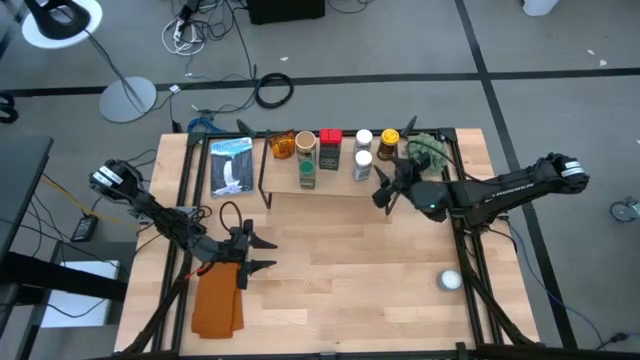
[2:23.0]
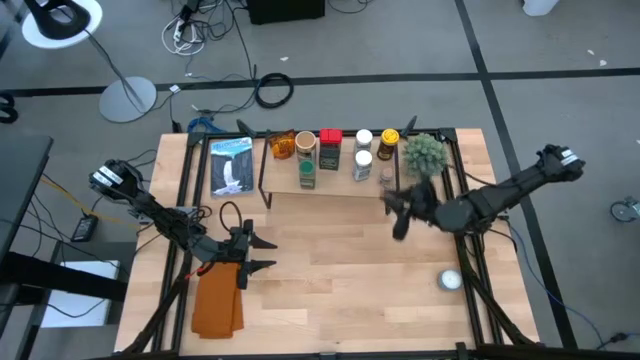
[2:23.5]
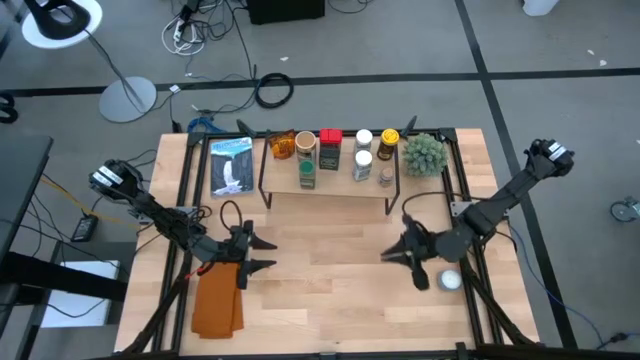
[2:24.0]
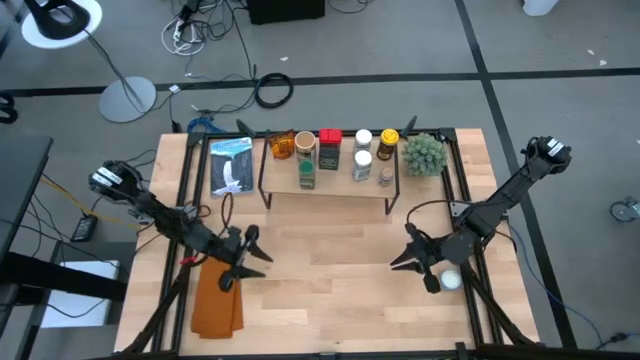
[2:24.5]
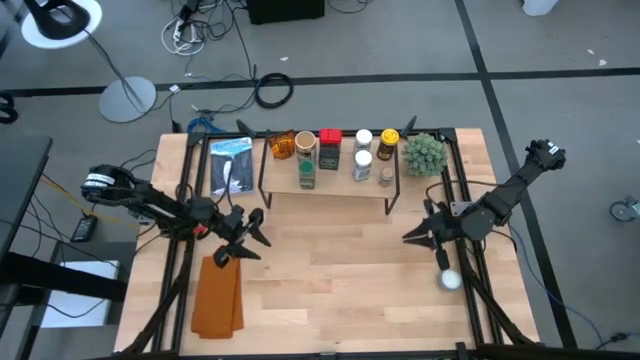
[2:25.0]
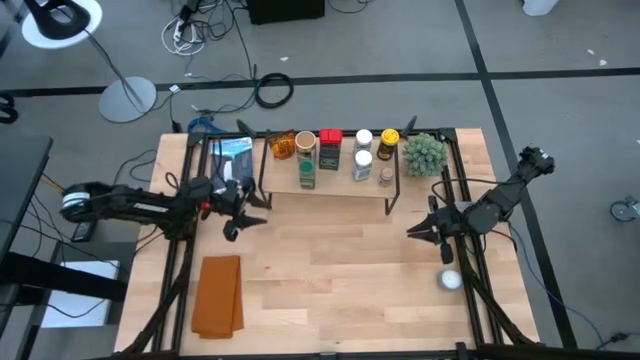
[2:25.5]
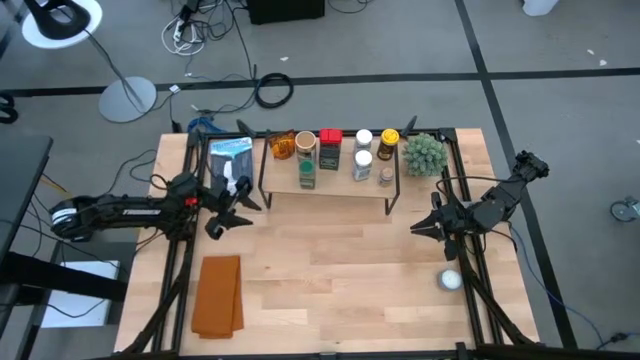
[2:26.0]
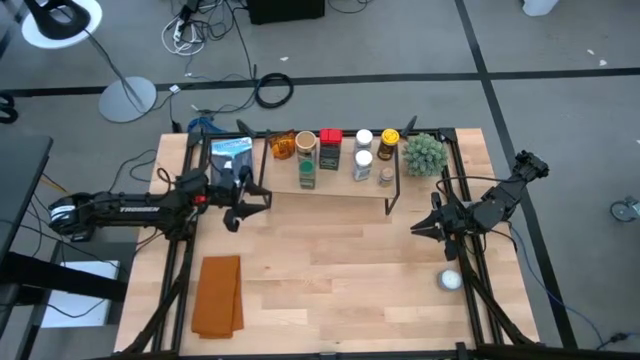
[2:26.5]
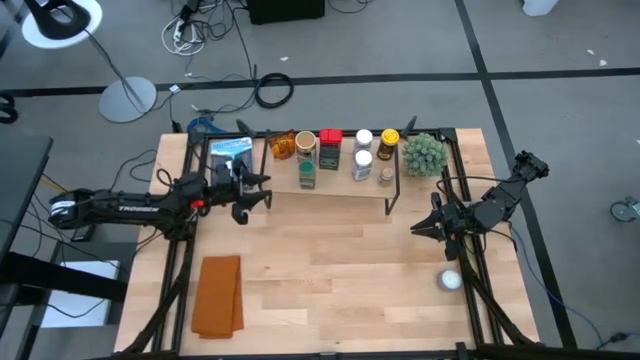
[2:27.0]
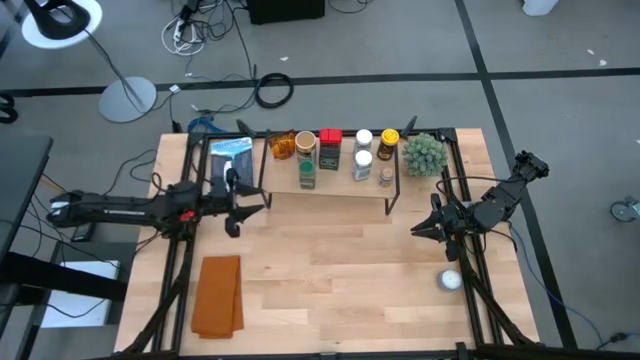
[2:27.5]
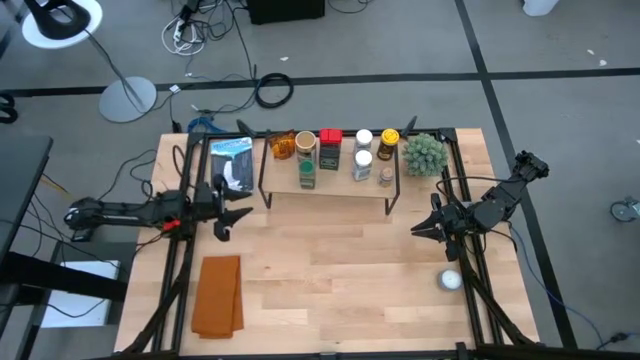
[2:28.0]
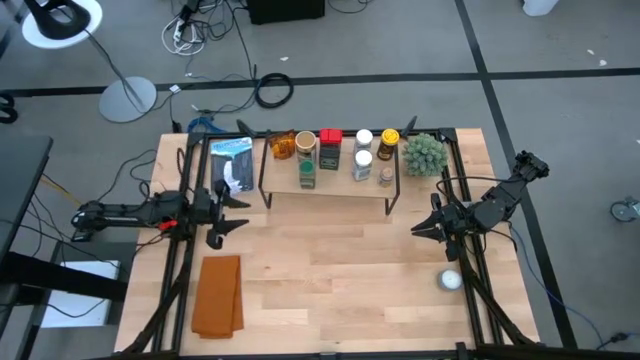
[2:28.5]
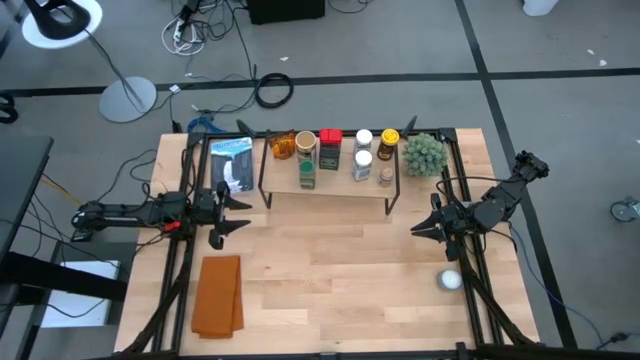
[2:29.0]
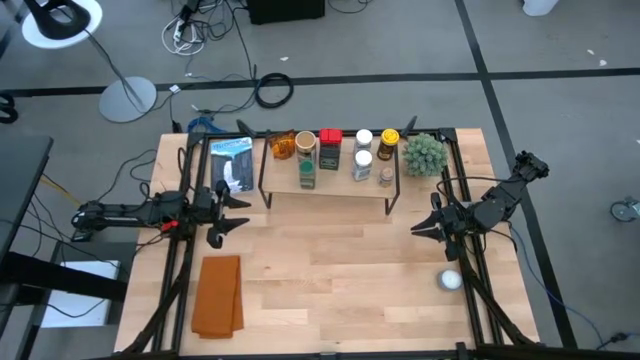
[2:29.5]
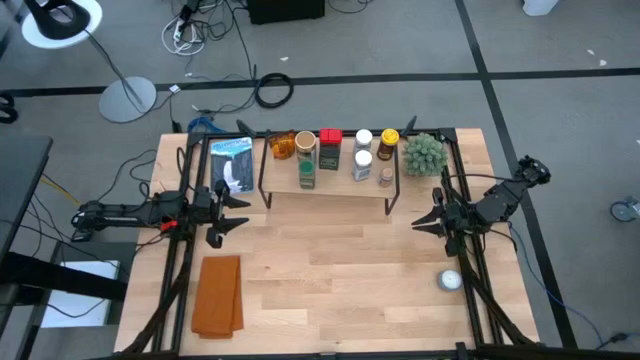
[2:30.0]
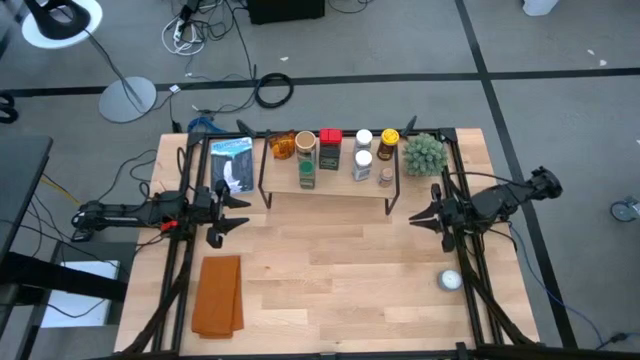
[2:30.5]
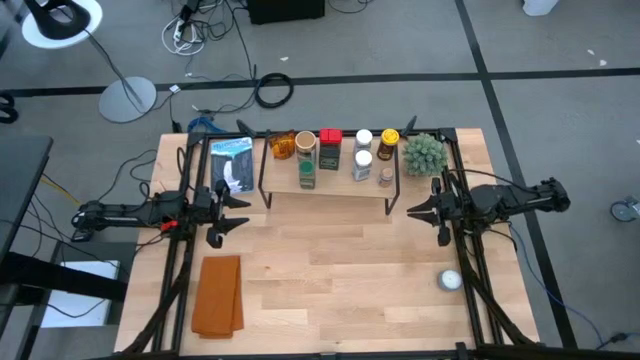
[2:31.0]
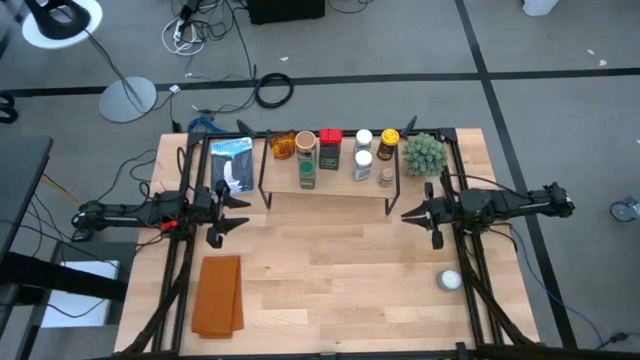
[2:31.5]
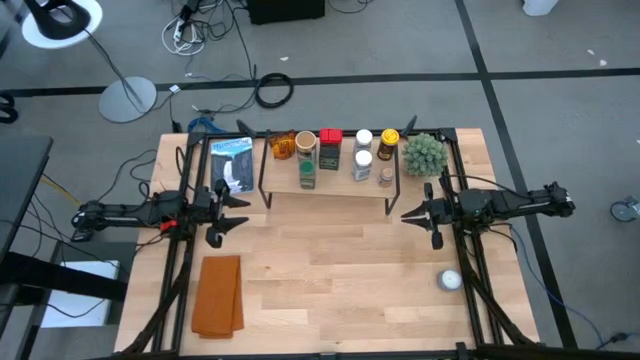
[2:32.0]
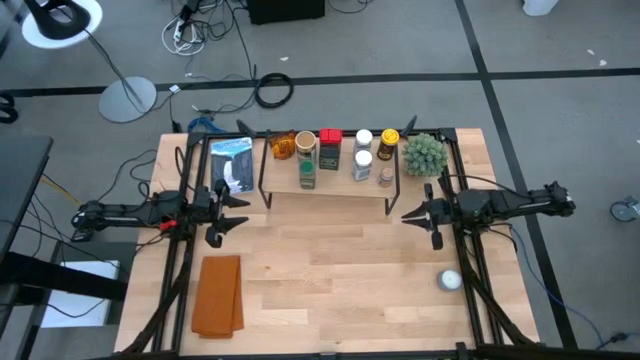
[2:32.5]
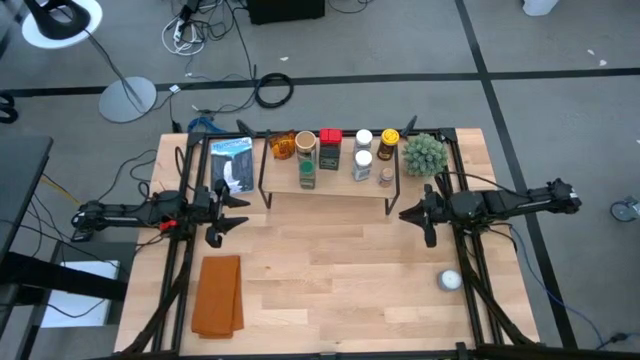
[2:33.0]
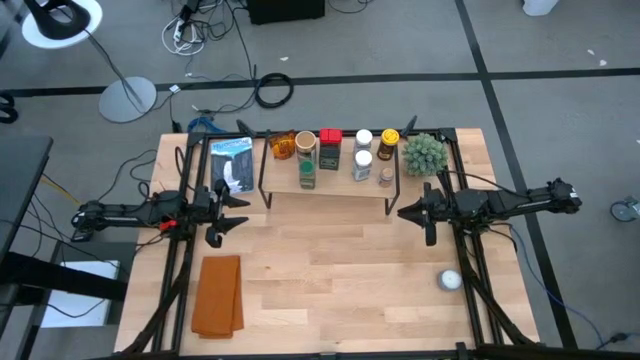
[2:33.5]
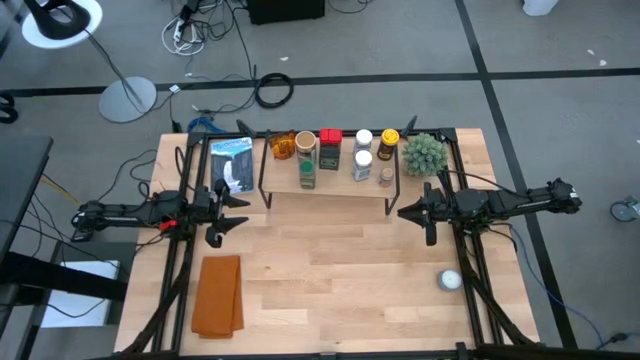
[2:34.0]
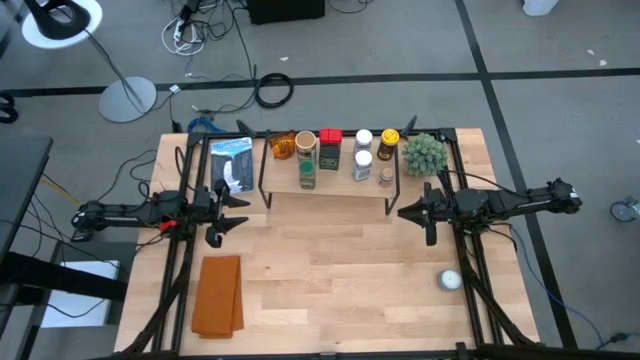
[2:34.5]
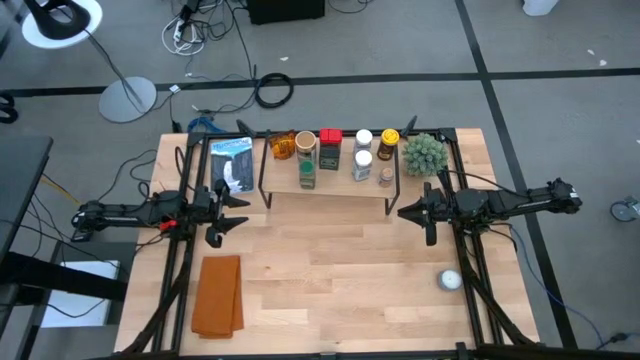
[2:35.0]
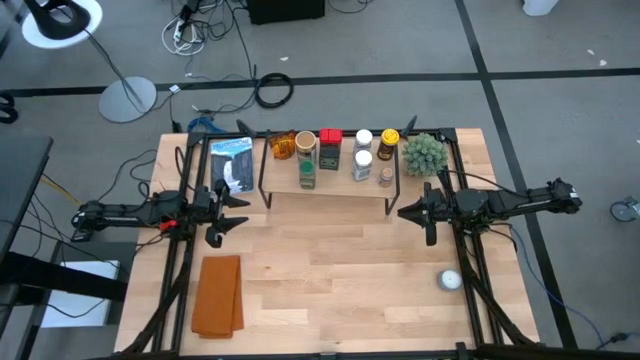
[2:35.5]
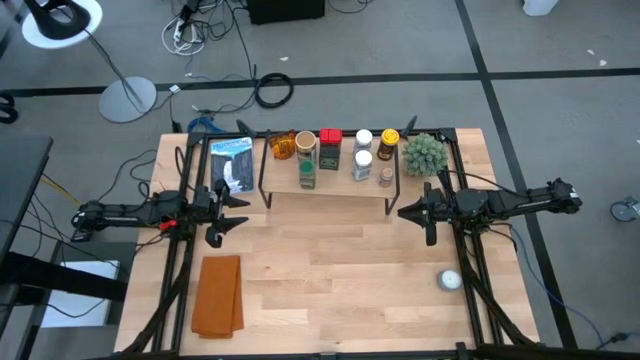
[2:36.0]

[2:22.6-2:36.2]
Task: Shelf spices
Return to Home Position

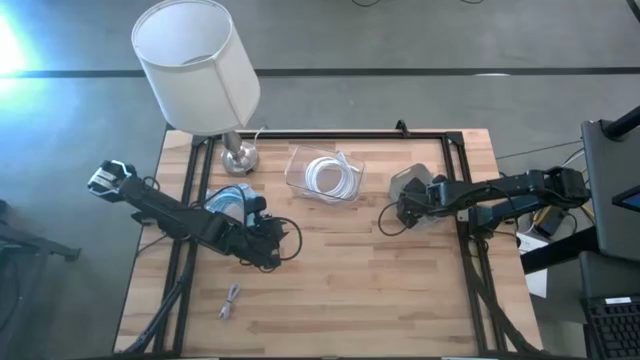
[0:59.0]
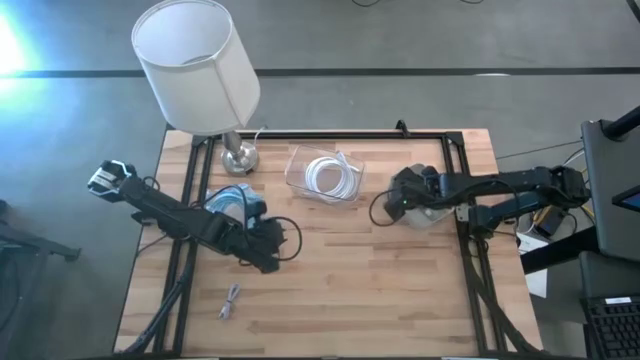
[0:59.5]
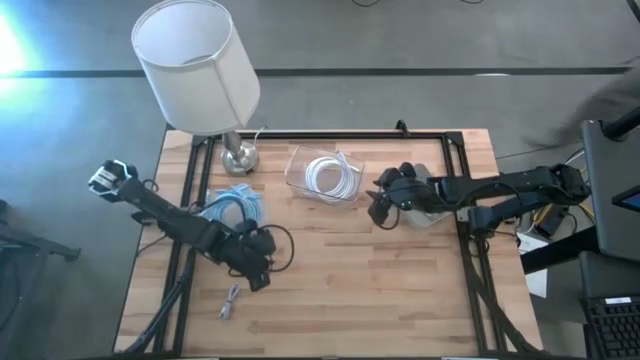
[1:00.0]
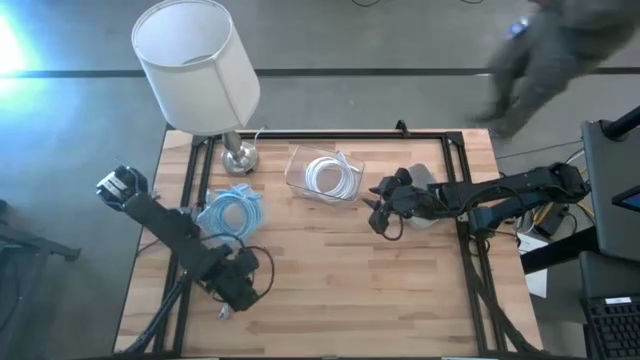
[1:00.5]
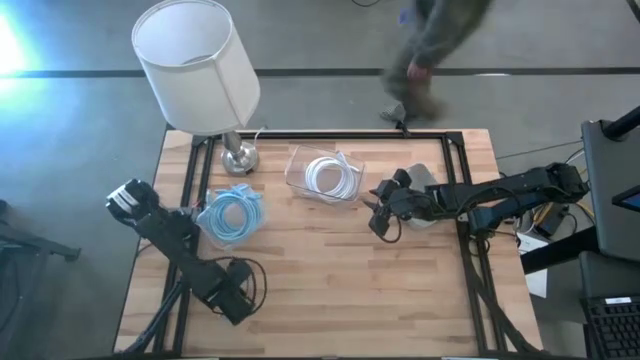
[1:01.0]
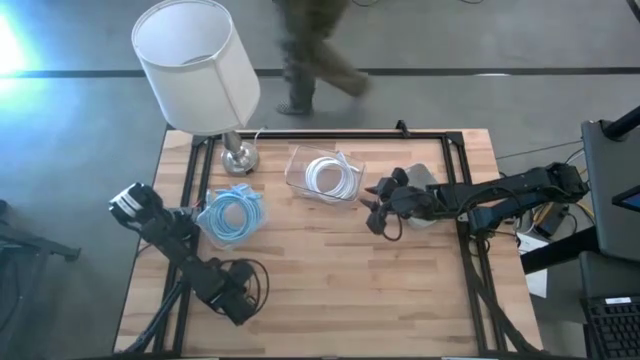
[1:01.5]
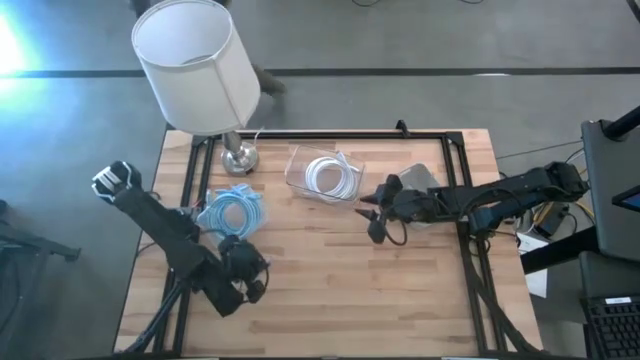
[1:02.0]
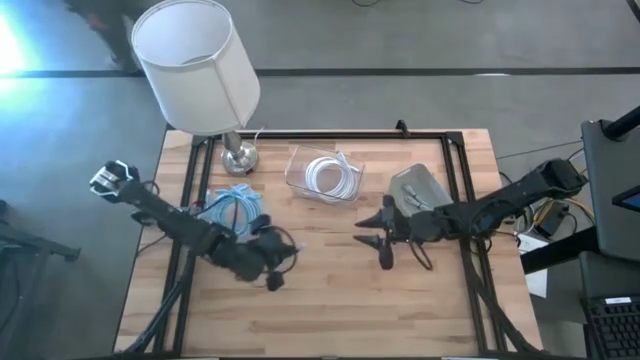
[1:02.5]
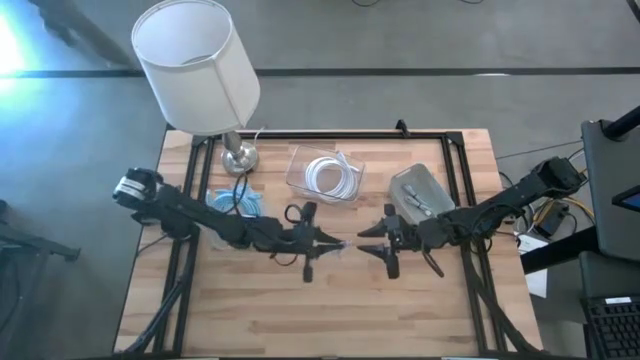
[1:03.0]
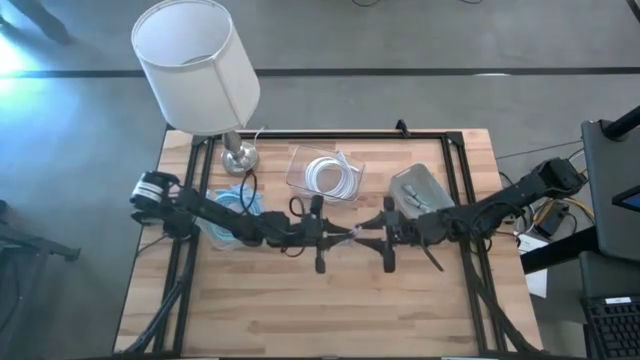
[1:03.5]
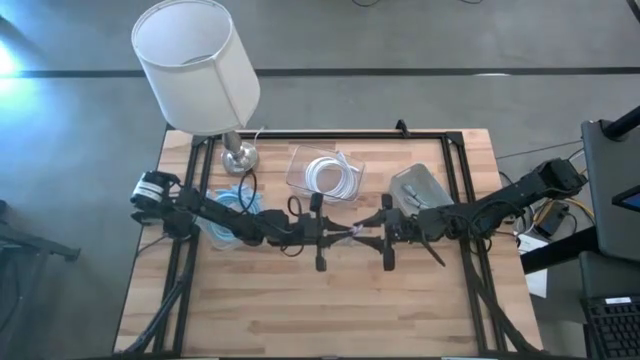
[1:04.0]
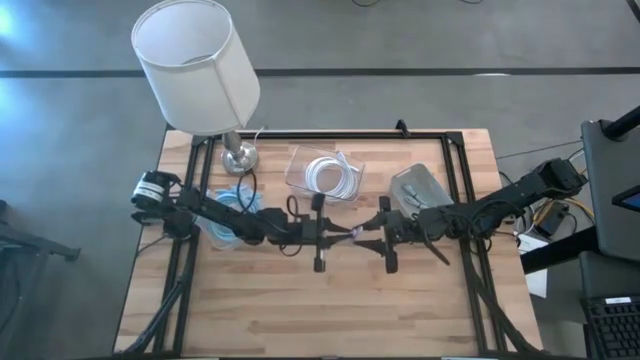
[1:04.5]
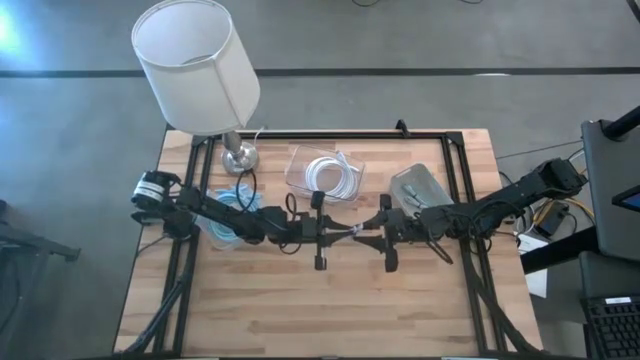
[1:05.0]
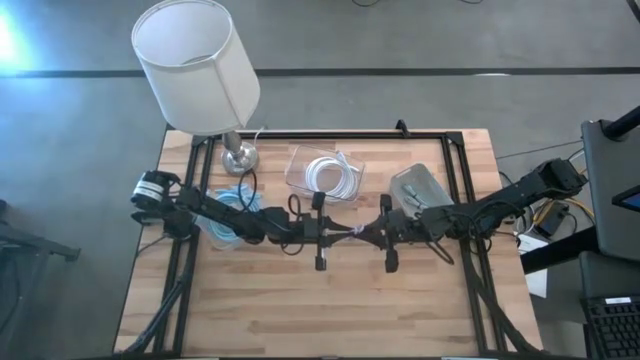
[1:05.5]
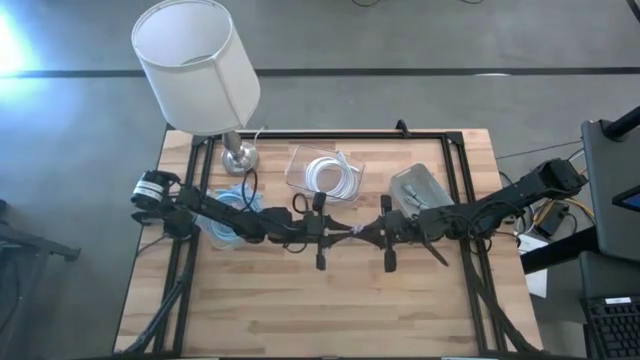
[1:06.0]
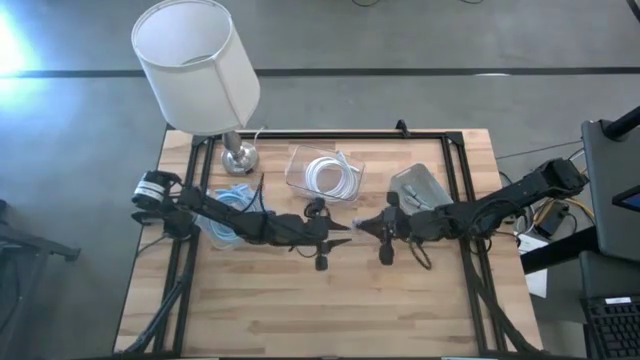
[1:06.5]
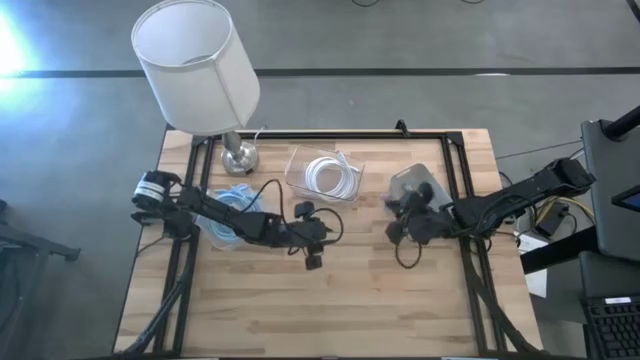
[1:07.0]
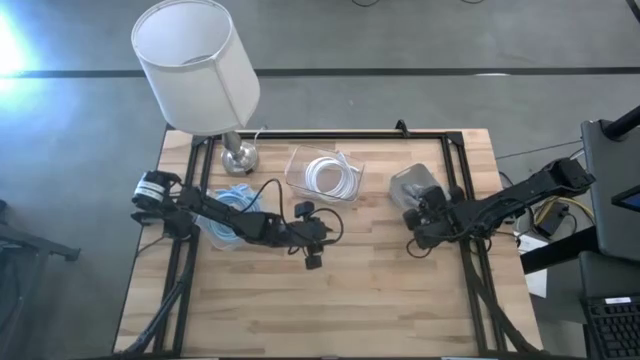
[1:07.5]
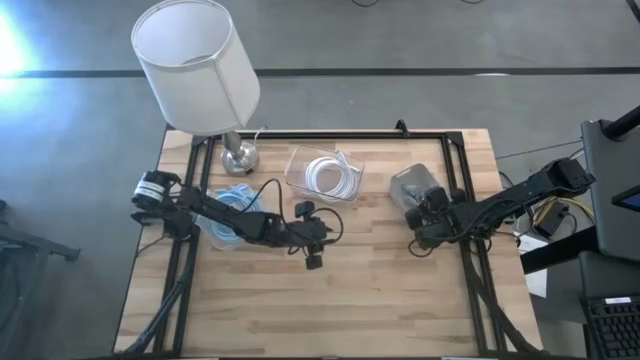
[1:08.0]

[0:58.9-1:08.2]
Task: Pick & Place USB Port
Put the purple USB charging cable into the gray bin
